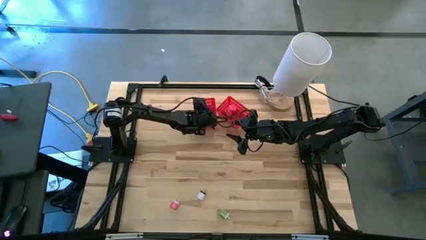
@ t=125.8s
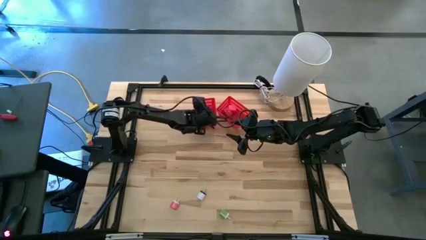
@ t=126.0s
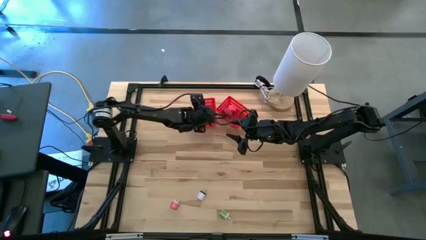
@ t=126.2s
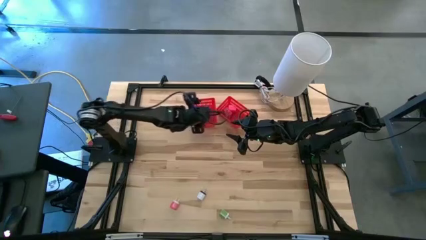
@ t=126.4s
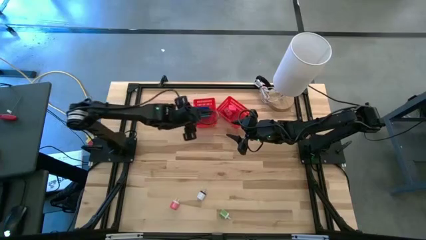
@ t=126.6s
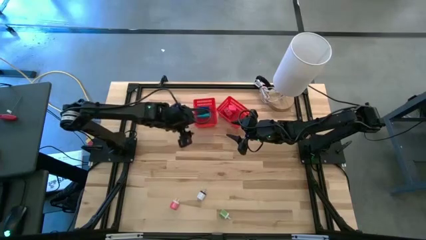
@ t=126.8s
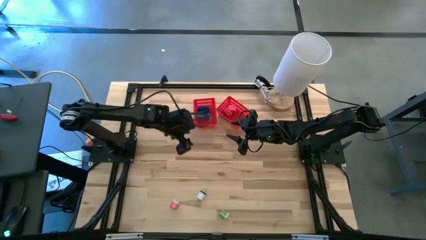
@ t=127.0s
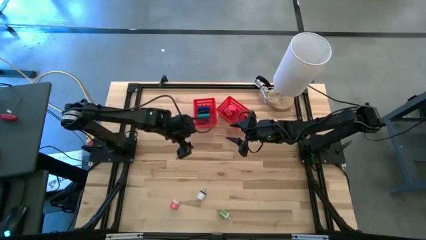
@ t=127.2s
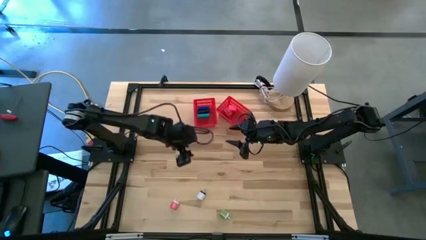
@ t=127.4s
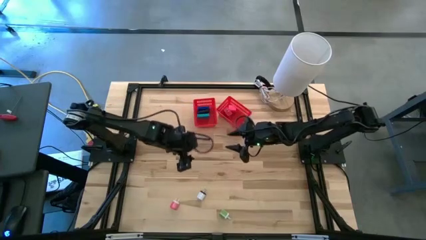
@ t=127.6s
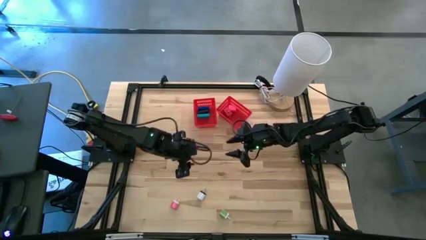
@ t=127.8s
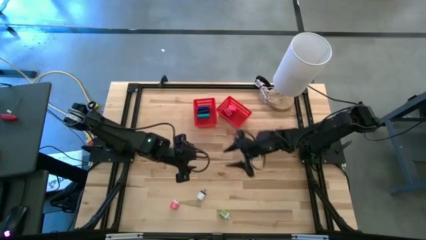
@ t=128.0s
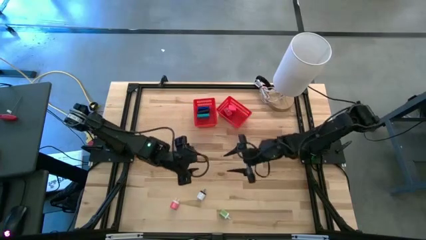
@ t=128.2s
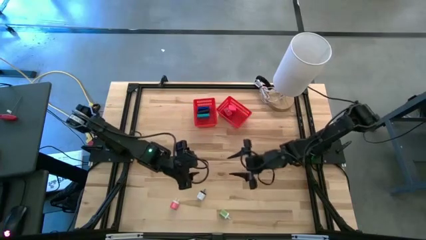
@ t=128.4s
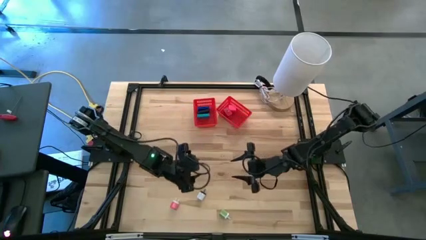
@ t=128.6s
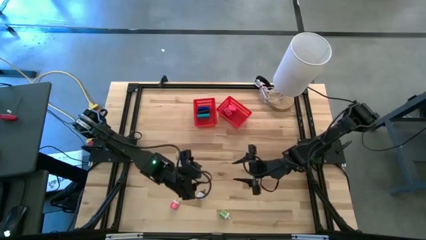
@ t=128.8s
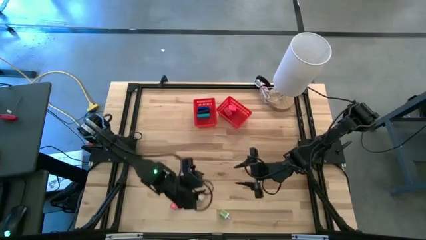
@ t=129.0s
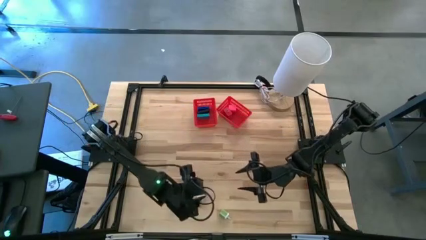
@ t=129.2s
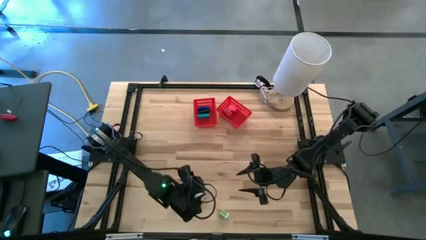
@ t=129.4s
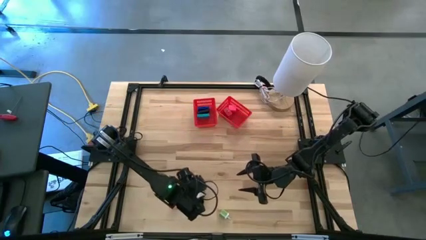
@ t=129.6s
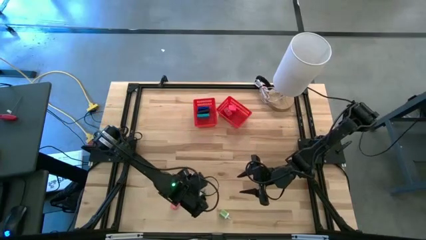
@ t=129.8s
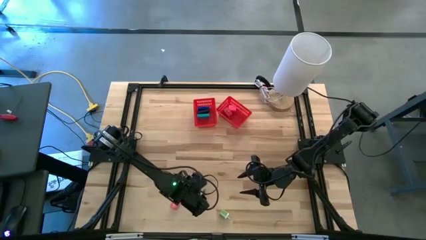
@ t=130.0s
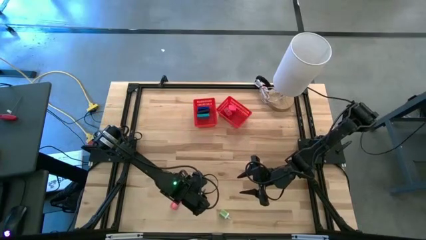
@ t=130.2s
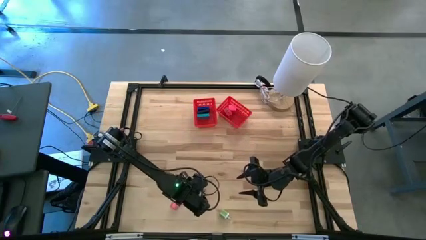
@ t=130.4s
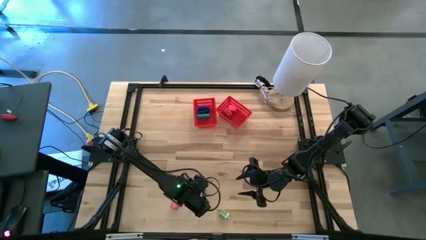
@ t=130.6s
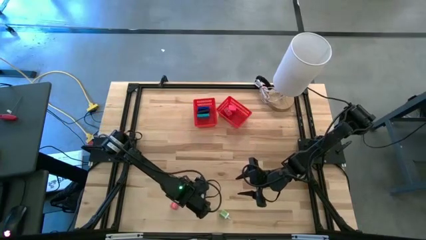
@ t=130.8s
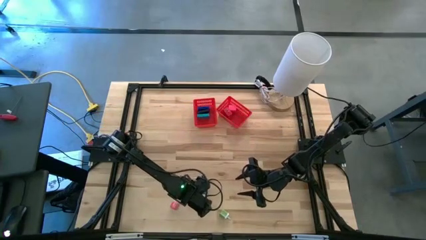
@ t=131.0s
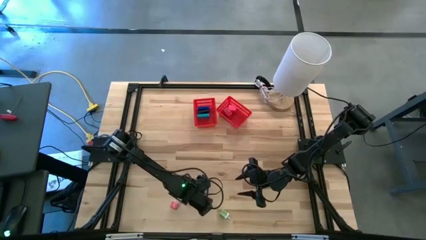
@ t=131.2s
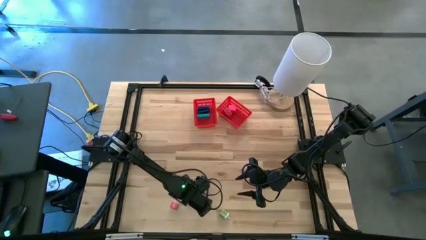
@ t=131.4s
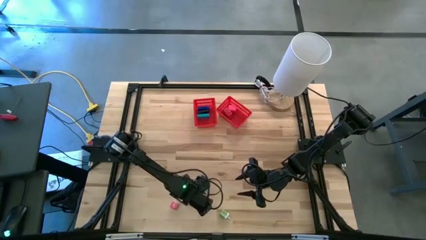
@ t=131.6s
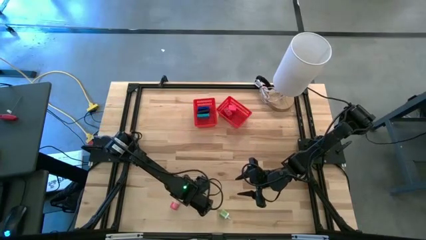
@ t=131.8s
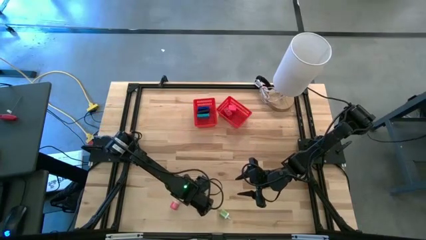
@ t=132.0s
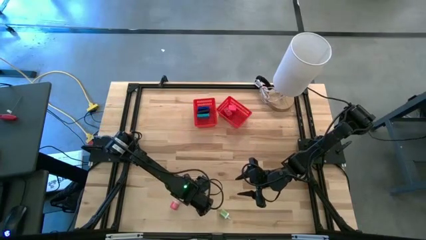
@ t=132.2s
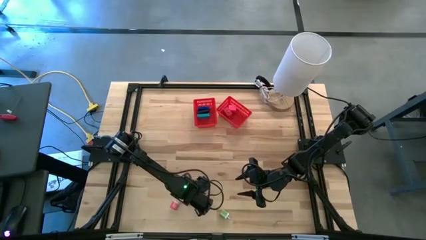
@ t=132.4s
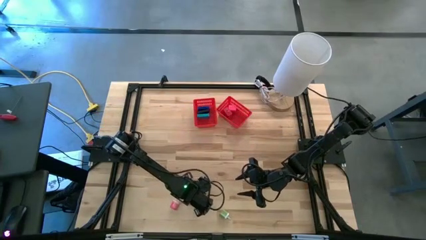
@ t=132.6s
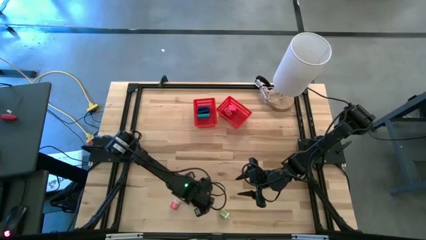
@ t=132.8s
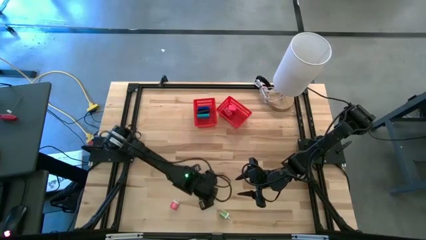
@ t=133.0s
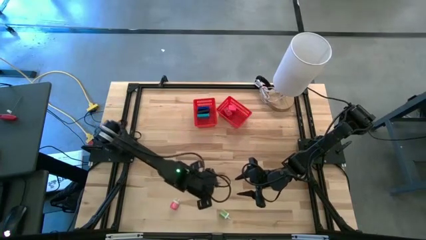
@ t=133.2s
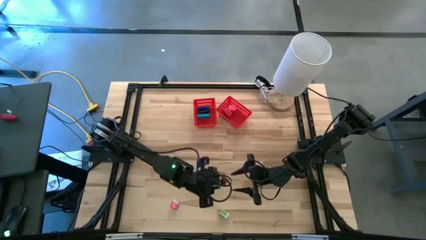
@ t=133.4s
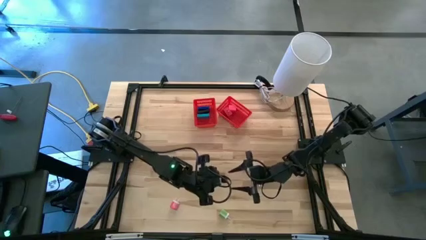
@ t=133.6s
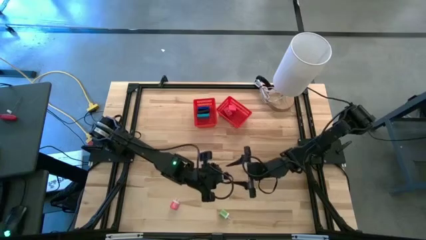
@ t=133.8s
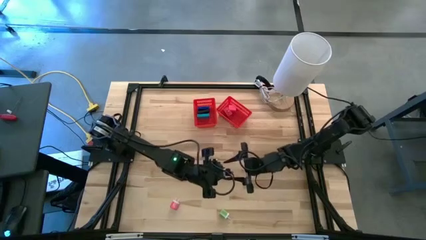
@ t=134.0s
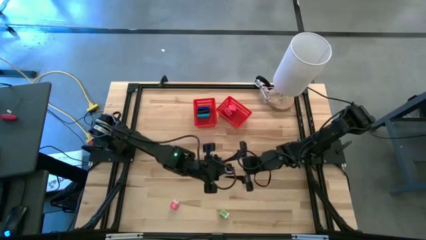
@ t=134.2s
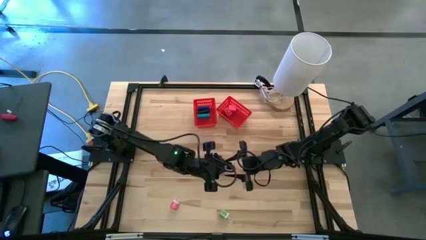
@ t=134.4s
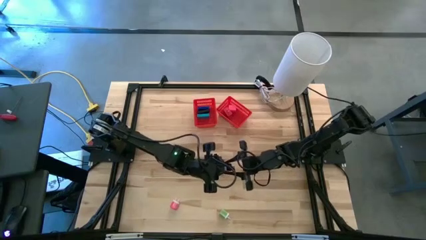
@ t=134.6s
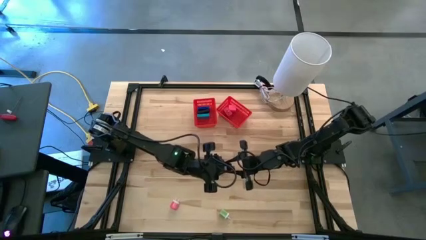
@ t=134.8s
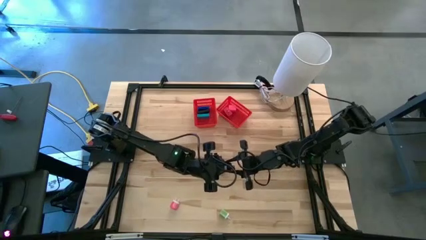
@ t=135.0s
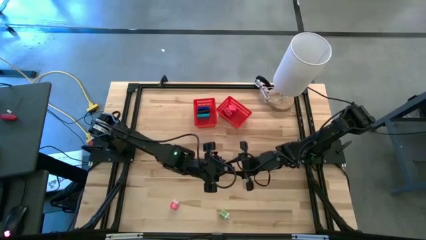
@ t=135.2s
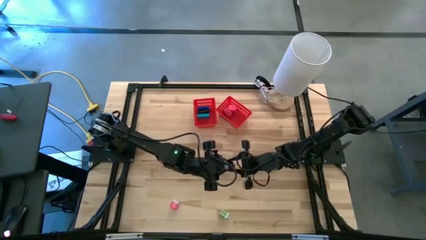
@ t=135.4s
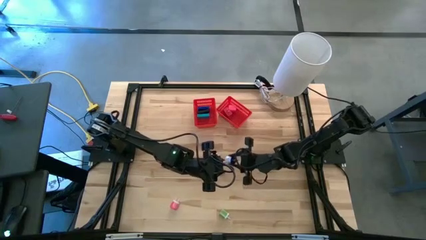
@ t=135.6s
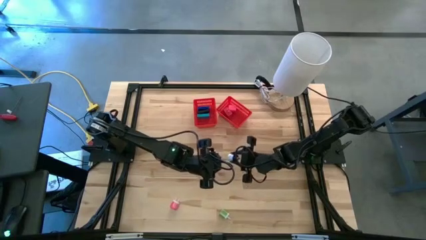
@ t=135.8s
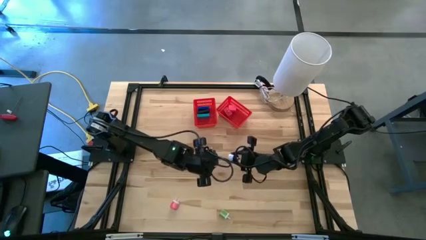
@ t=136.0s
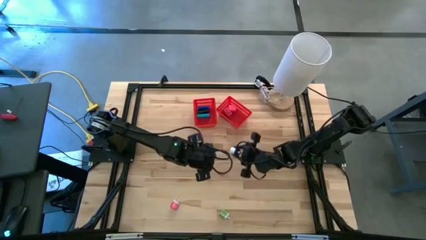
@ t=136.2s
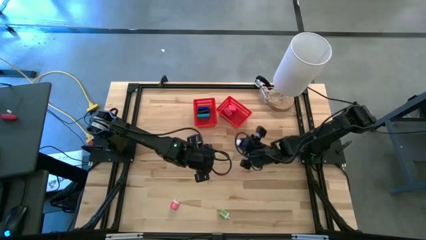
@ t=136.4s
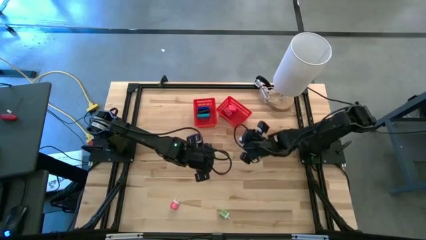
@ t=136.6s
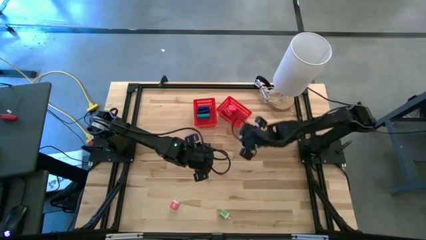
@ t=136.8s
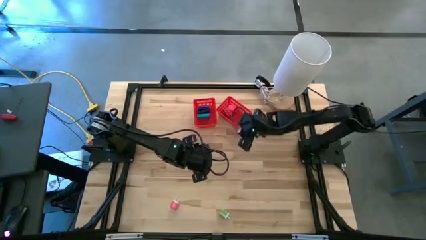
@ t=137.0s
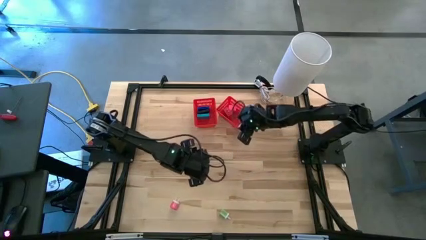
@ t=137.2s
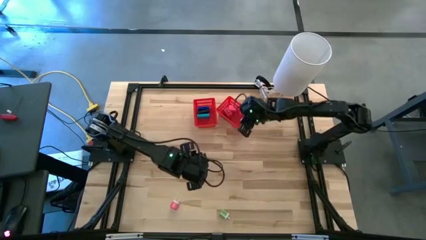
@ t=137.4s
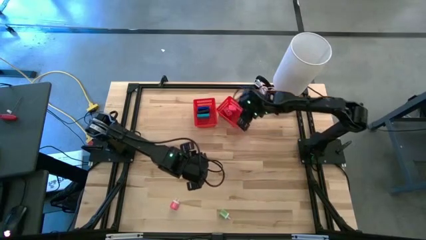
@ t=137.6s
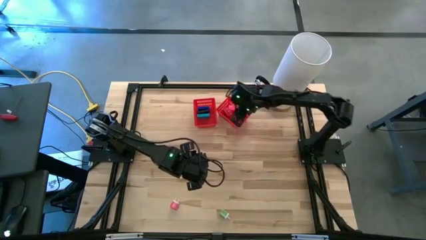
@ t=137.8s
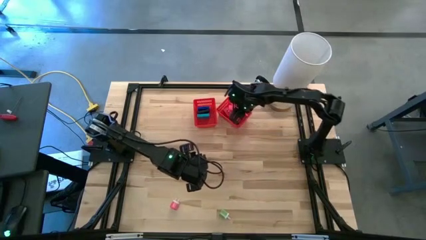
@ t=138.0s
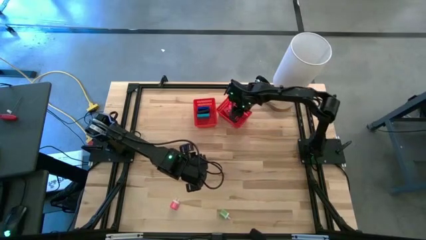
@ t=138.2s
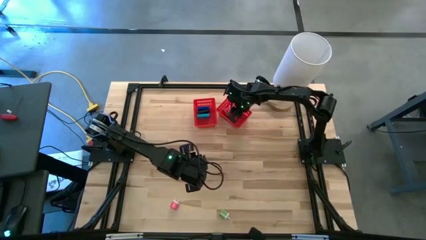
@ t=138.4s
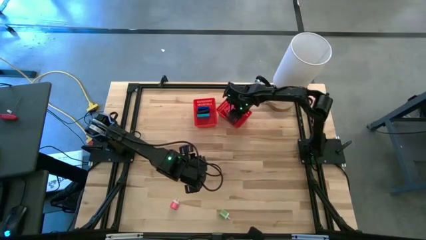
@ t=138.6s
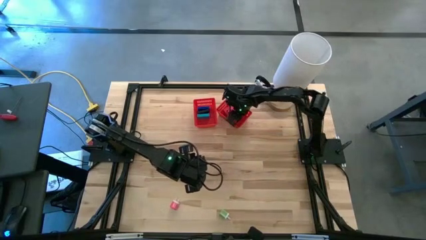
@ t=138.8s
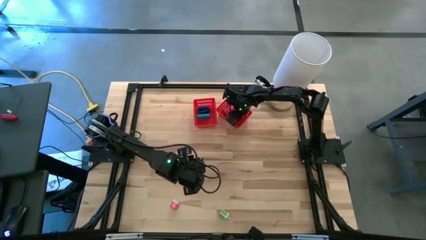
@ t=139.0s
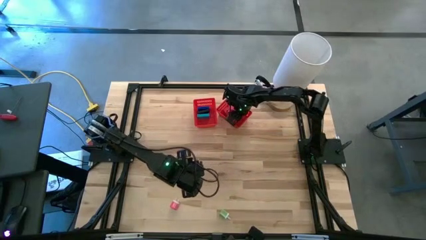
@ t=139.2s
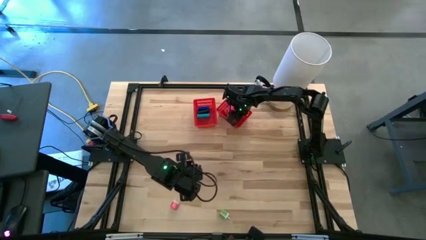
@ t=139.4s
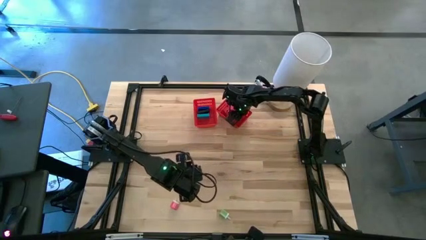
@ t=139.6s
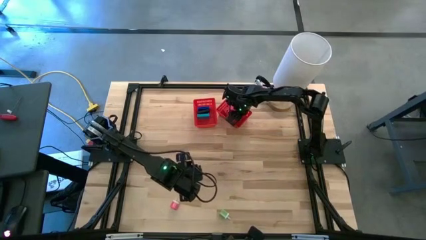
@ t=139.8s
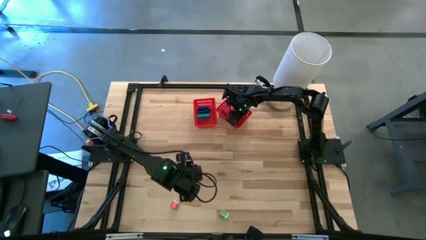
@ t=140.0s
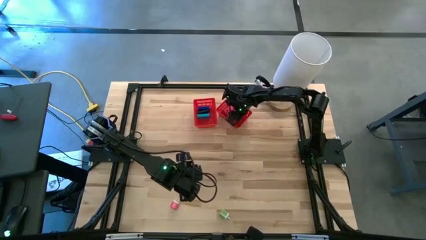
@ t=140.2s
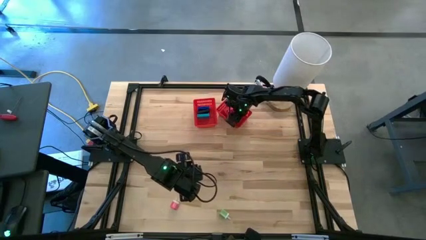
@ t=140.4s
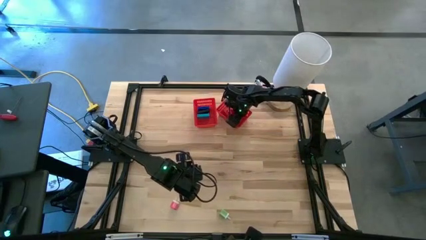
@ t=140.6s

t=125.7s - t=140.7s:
Task: Pick & Place Office items
Put the white charger adapter into the right red bin
